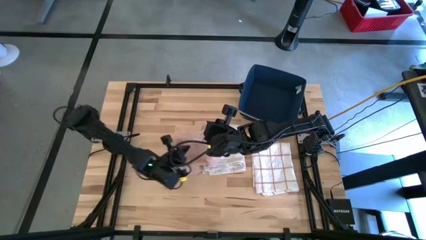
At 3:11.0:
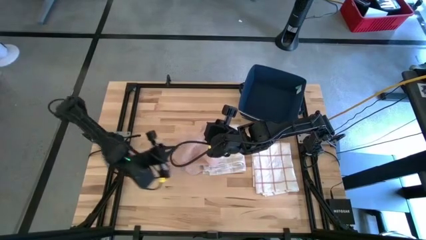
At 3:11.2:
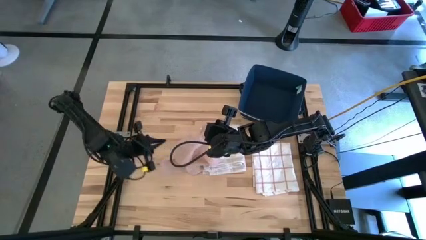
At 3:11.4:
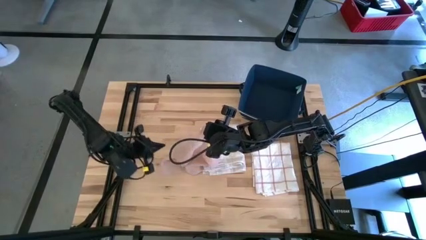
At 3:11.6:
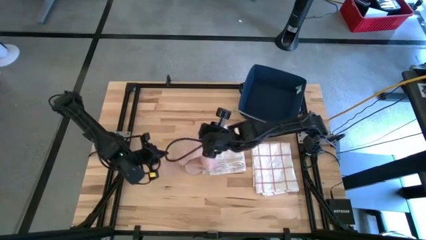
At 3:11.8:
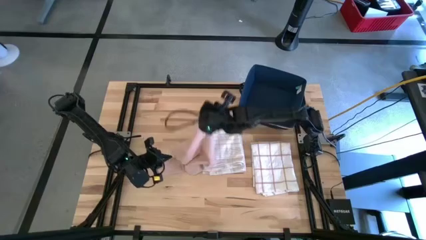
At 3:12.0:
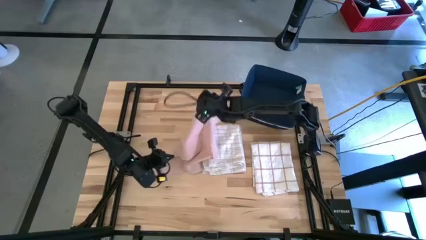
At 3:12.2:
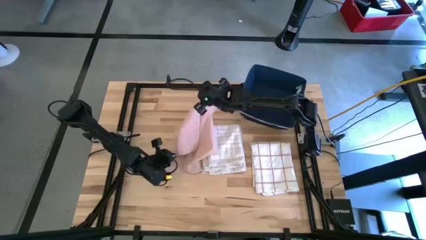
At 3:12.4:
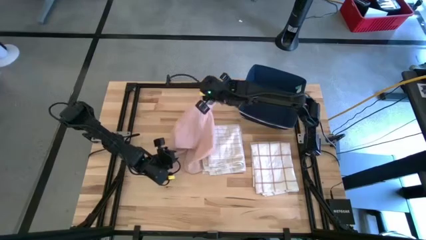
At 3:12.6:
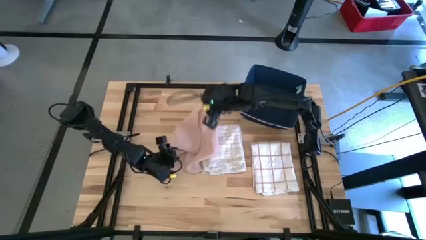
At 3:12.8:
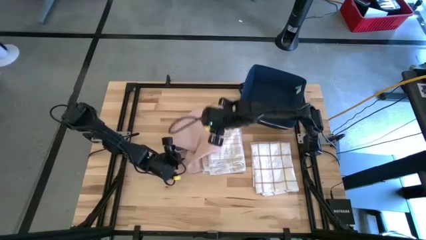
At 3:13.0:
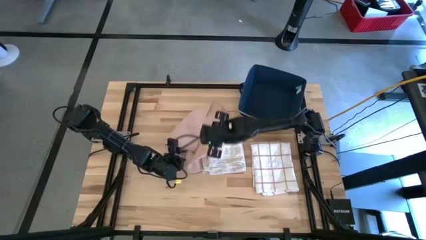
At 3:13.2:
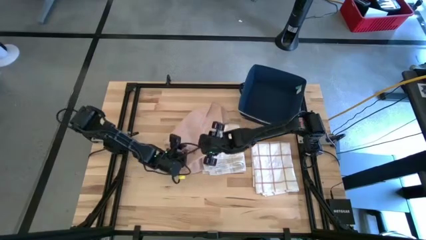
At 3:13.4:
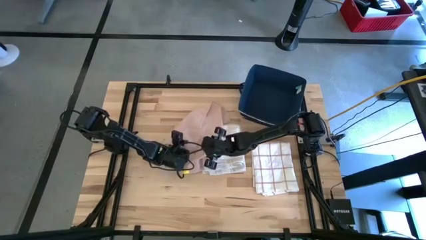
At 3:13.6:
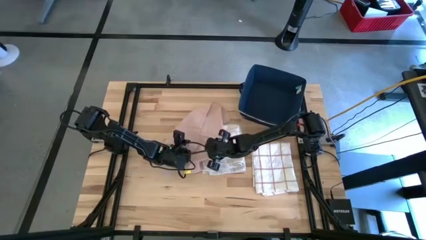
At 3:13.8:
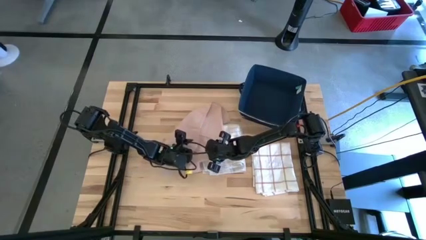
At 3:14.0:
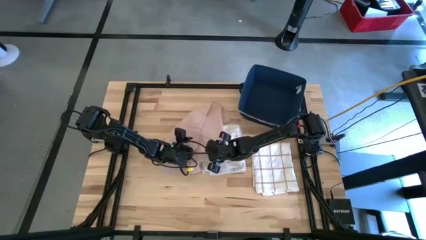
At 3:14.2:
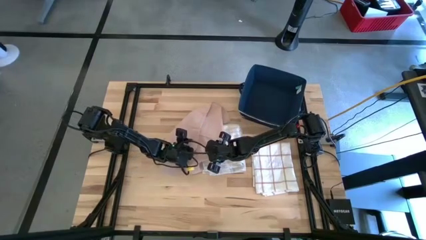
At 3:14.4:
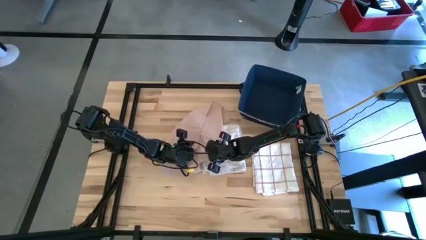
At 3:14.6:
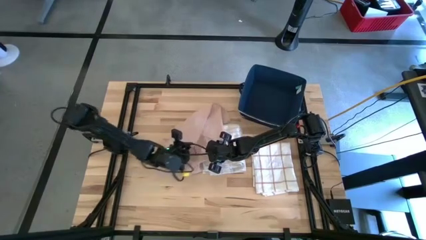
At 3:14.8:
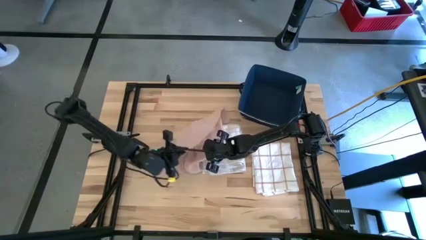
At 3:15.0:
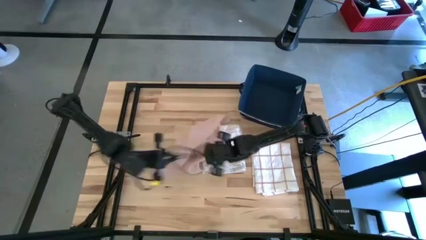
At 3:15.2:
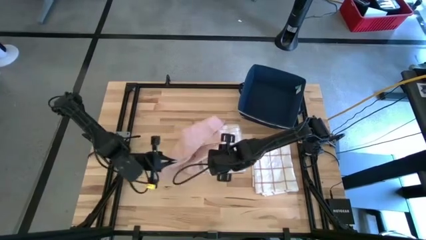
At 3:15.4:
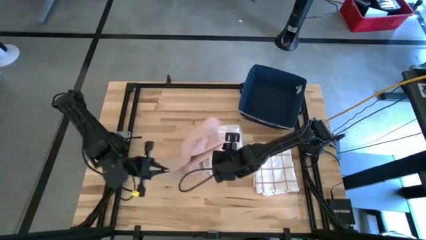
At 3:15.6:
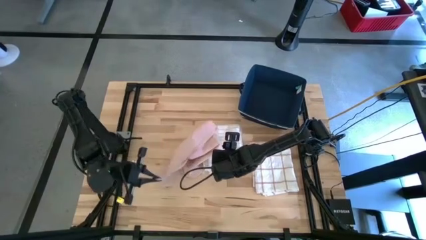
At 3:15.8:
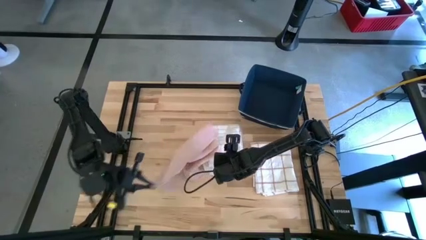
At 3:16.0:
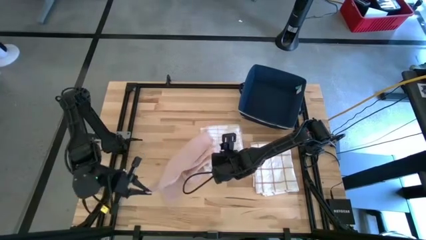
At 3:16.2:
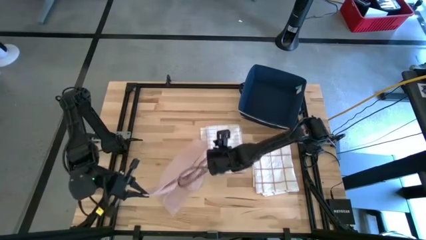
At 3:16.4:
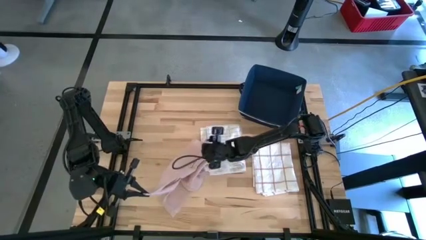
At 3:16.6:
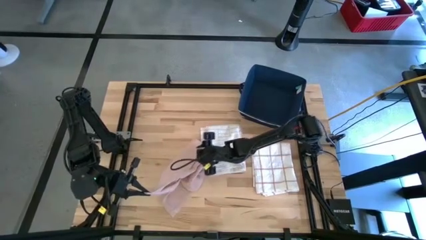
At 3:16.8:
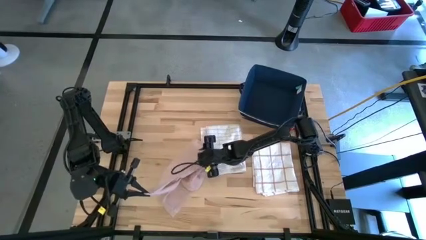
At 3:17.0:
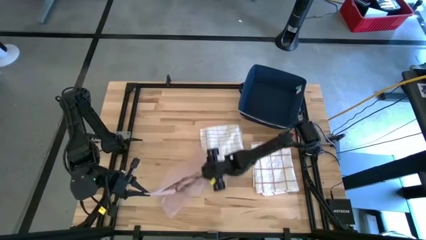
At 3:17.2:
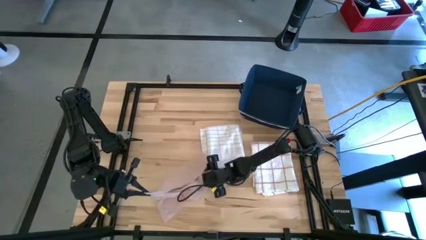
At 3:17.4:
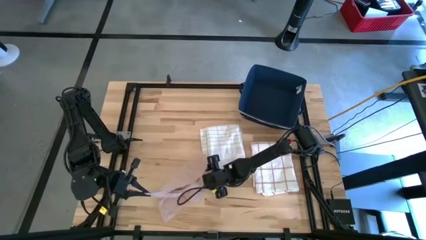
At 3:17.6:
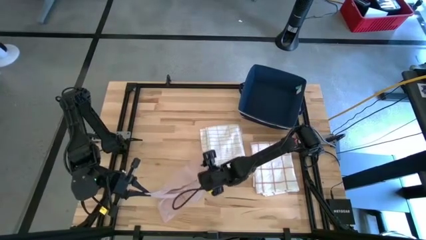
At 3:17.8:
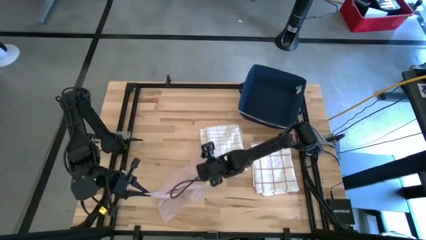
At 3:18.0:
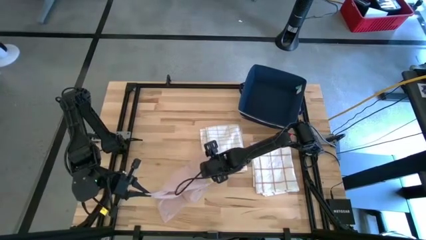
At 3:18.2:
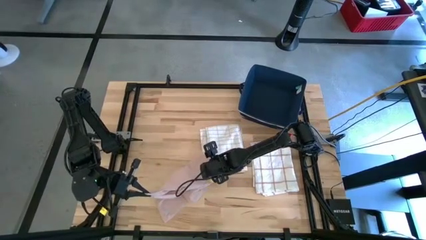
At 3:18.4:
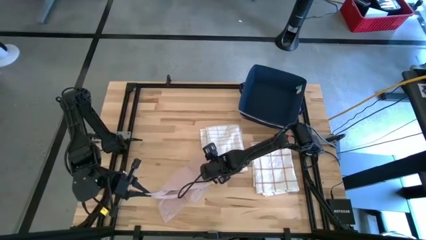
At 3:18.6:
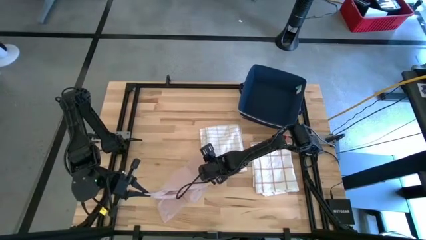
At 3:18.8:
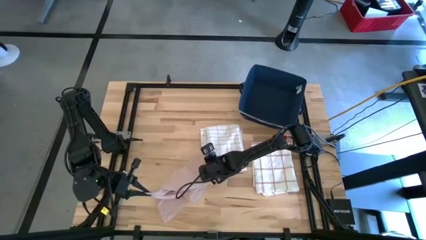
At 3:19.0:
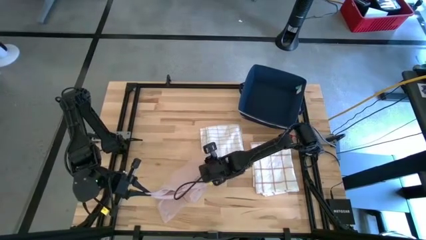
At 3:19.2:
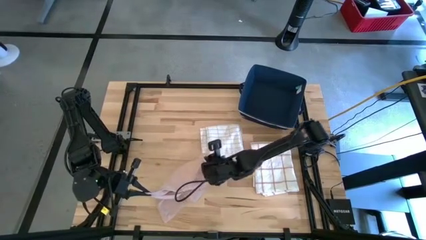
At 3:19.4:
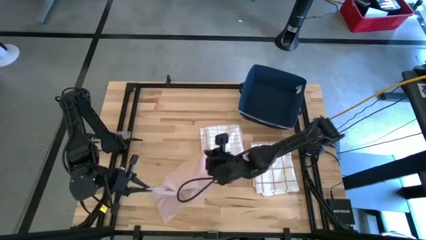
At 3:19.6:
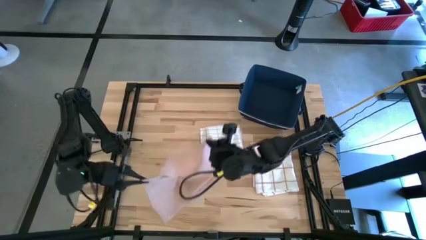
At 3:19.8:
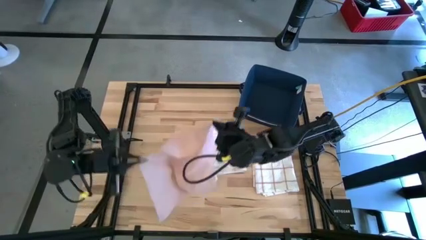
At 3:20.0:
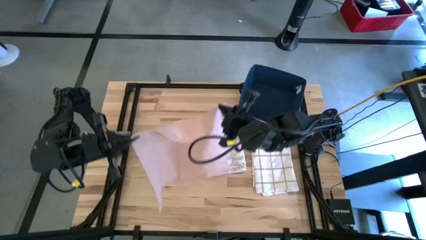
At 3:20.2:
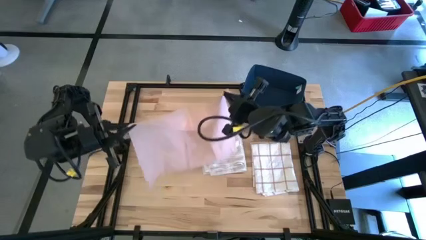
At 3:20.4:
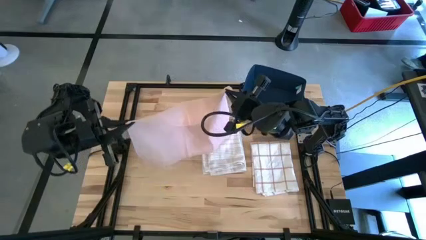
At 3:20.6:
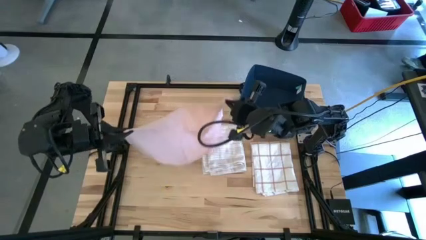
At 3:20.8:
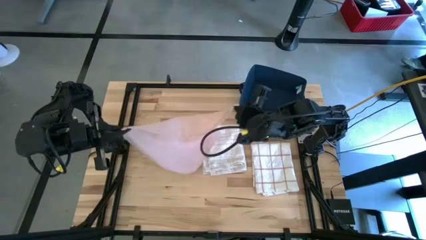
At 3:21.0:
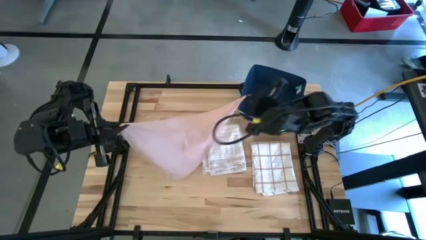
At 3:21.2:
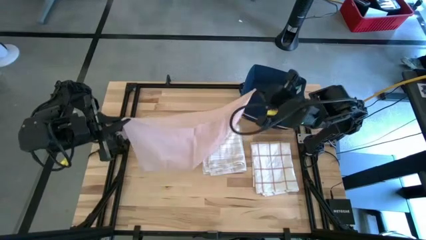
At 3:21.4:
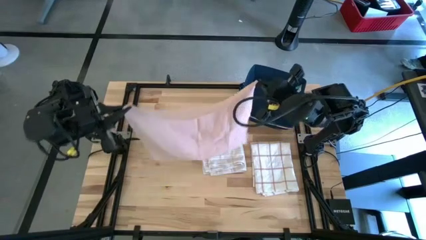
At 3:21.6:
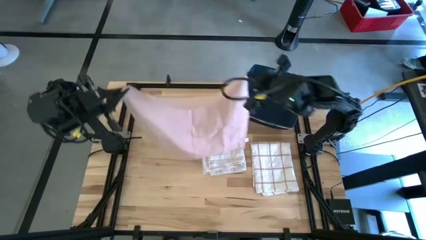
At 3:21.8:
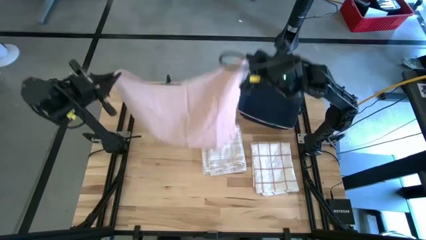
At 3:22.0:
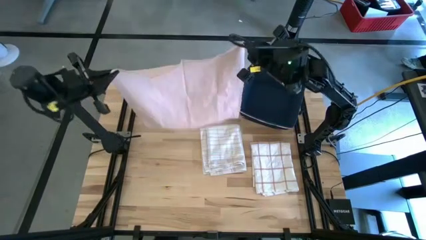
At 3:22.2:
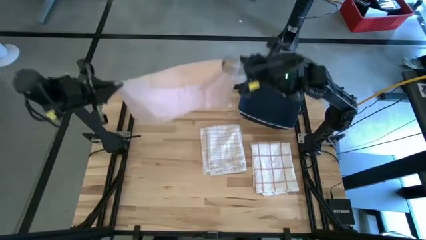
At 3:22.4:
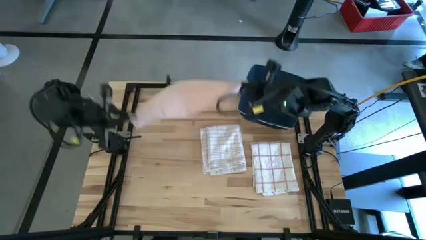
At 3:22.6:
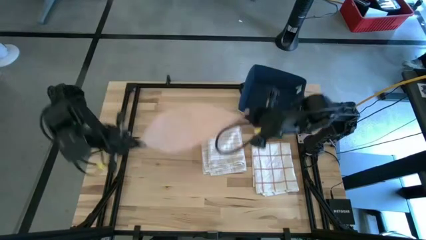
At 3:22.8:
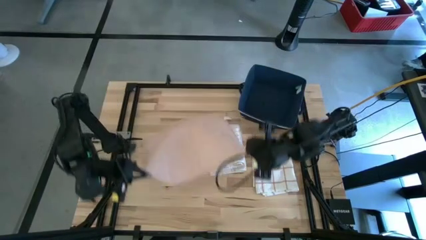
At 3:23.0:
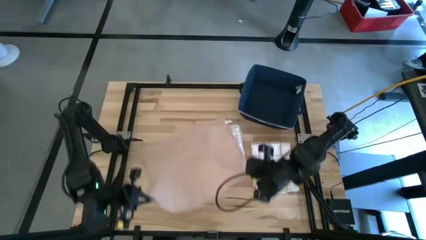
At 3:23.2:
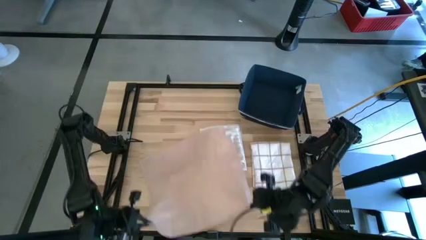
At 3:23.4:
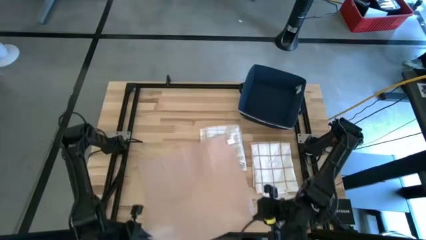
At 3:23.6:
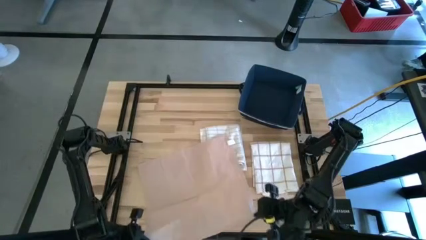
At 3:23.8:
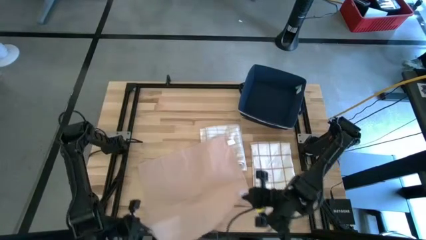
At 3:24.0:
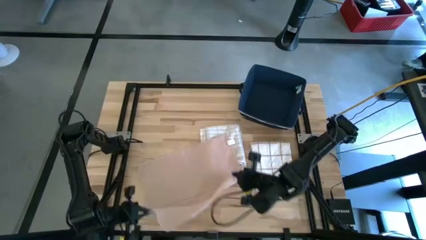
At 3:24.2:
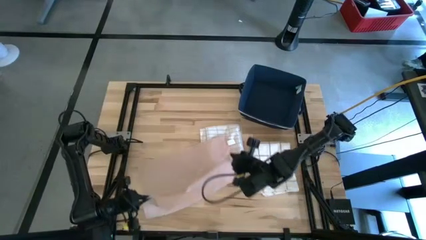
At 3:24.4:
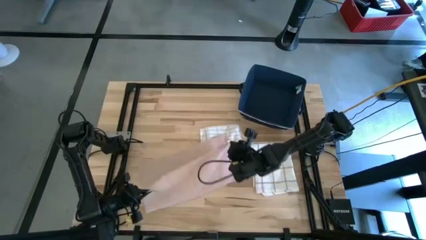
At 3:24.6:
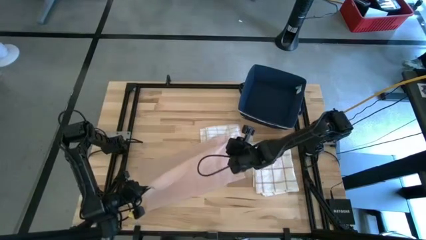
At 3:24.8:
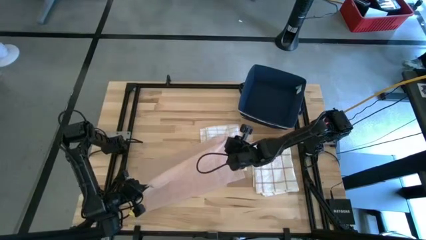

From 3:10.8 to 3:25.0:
Task: Fold towel
Fold the light pink towel

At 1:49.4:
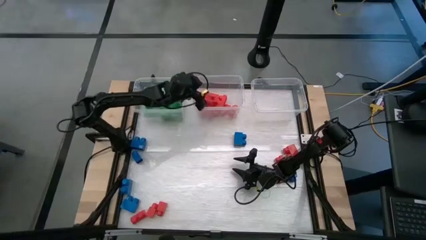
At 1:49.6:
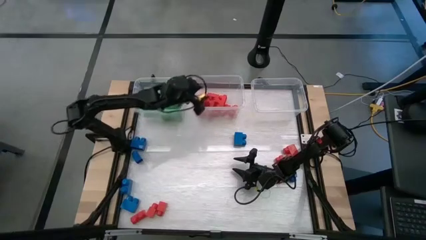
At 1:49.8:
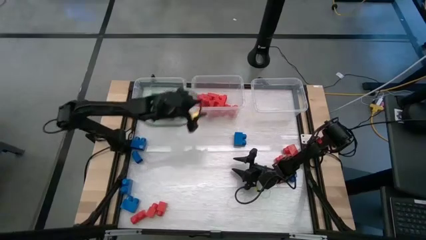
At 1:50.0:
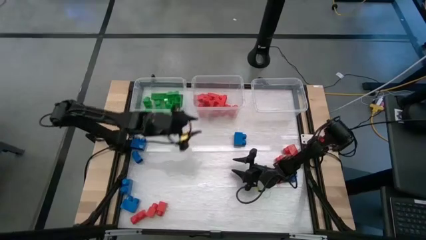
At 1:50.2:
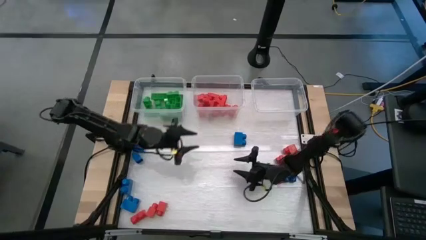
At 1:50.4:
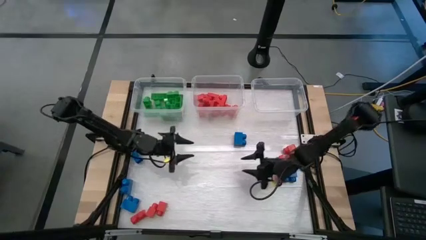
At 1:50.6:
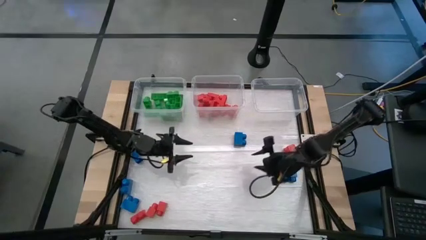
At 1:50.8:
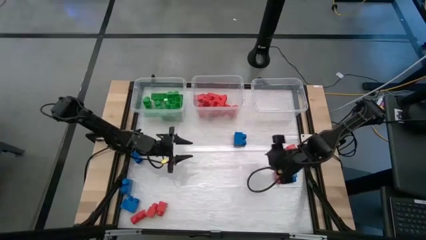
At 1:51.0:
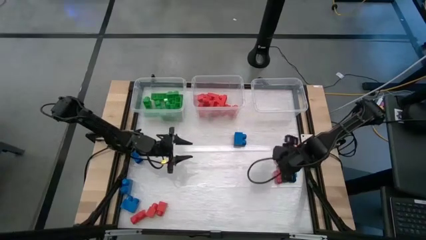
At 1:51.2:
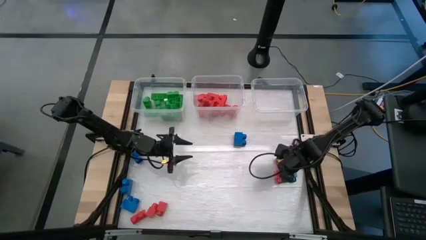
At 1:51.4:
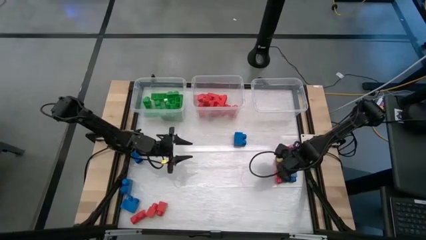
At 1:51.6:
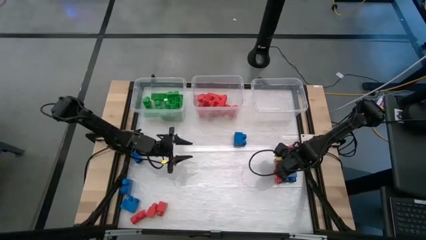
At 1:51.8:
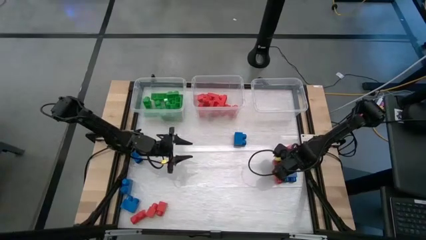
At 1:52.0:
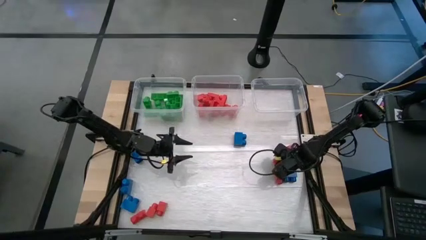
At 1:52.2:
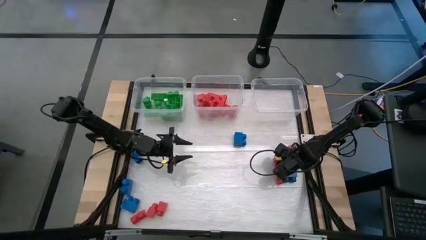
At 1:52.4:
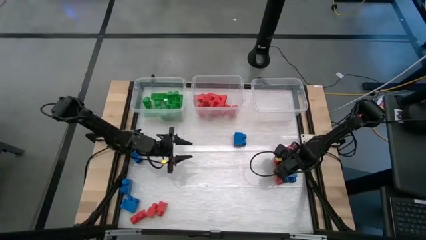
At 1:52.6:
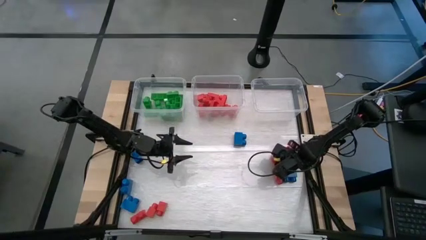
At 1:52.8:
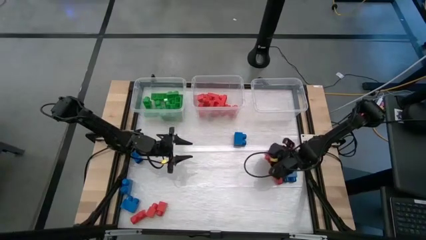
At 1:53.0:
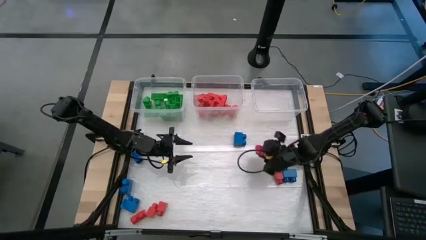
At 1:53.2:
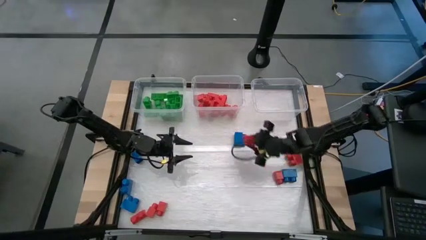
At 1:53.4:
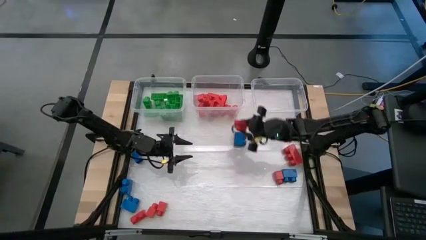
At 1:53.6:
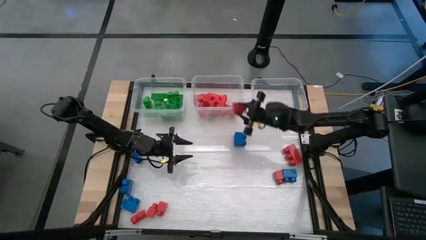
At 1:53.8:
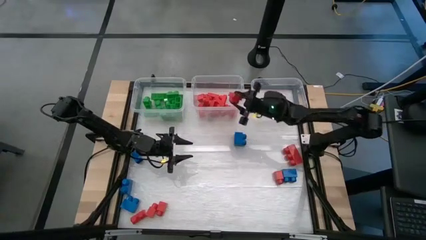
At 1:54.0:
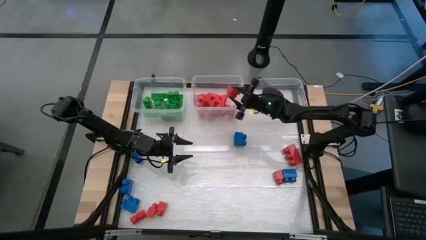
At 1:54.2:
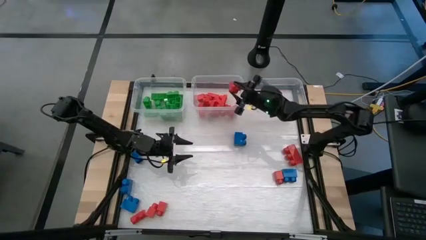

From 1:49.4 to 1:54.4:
Task: Sort blocks
Put the red game piece into the middle transparent bin
